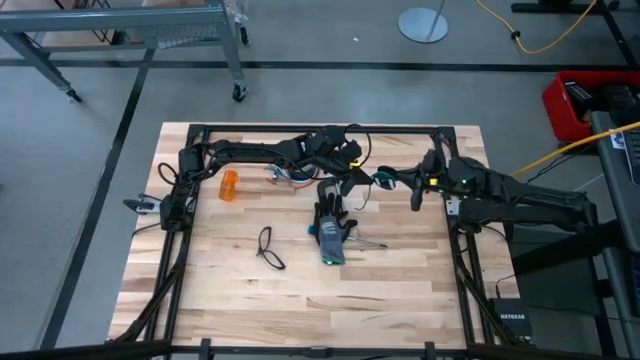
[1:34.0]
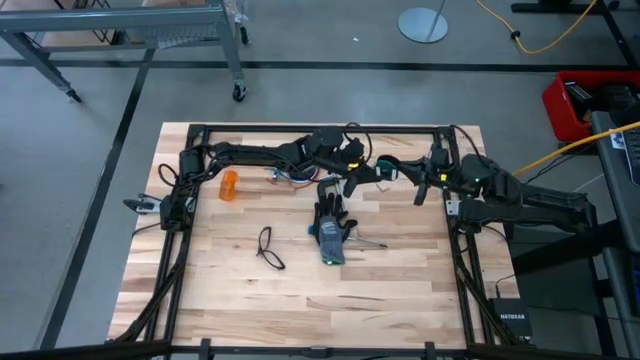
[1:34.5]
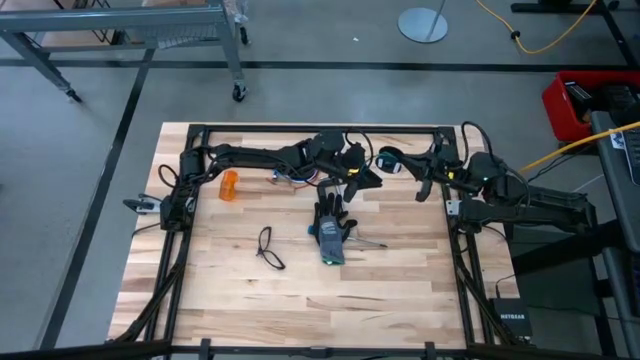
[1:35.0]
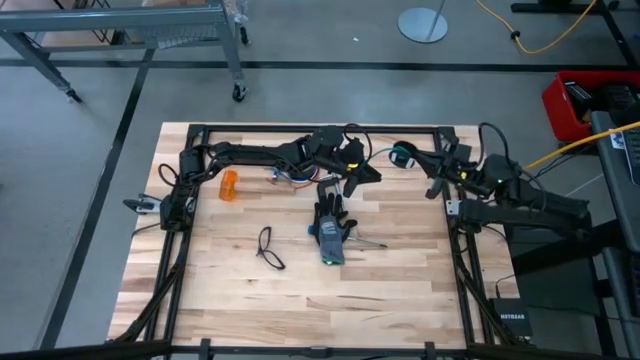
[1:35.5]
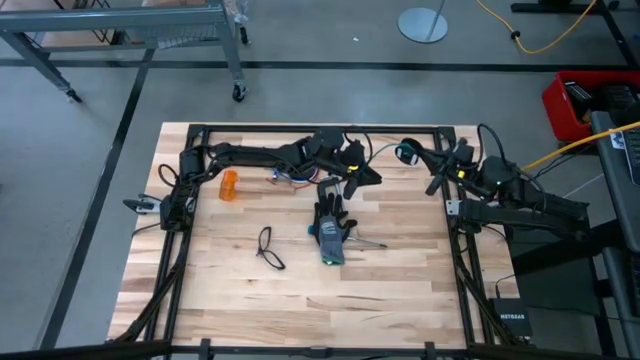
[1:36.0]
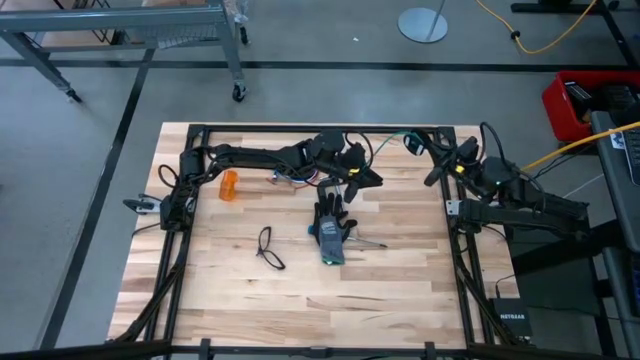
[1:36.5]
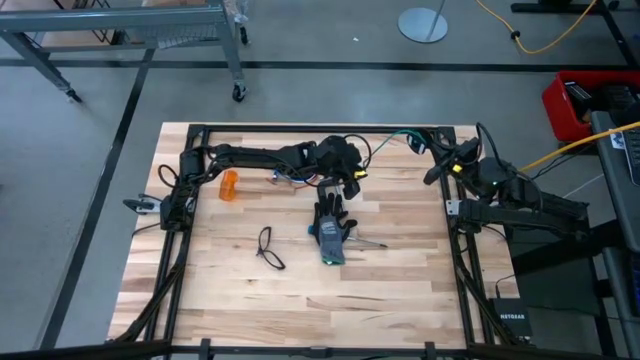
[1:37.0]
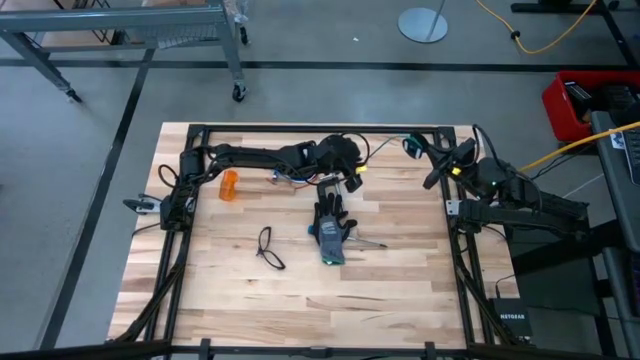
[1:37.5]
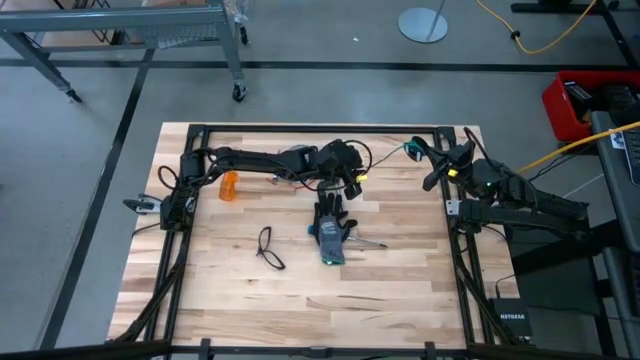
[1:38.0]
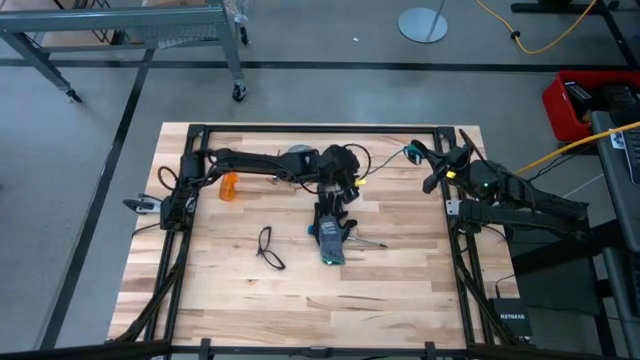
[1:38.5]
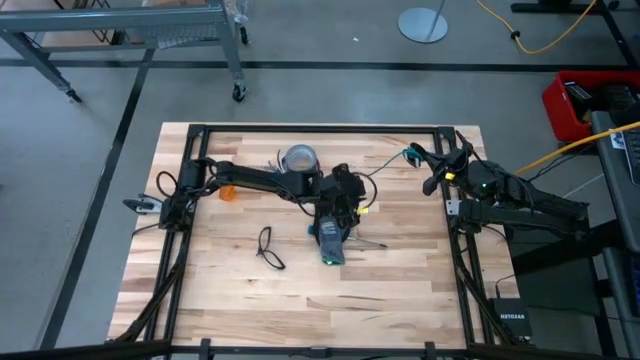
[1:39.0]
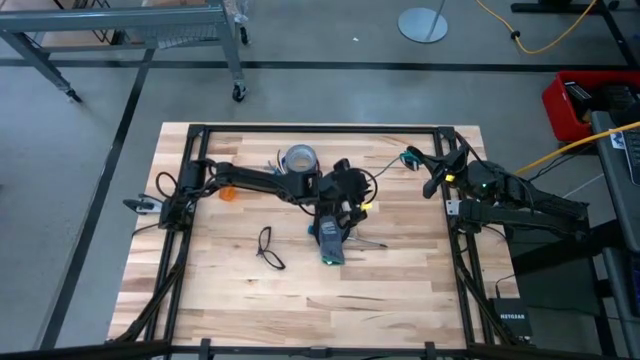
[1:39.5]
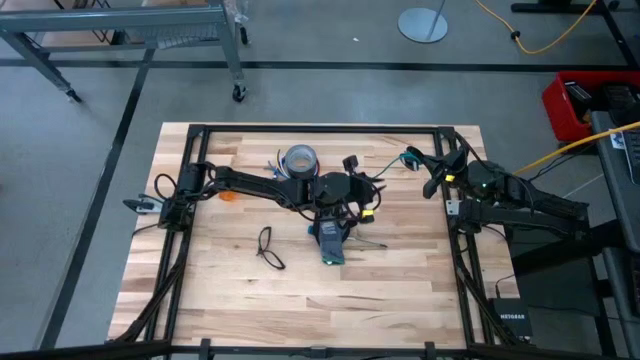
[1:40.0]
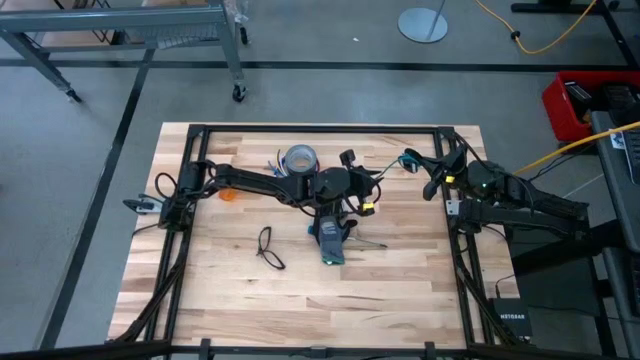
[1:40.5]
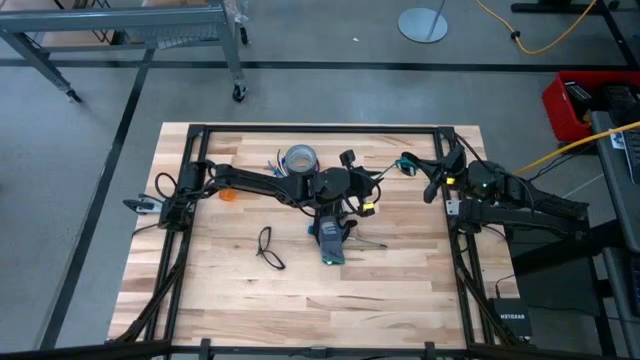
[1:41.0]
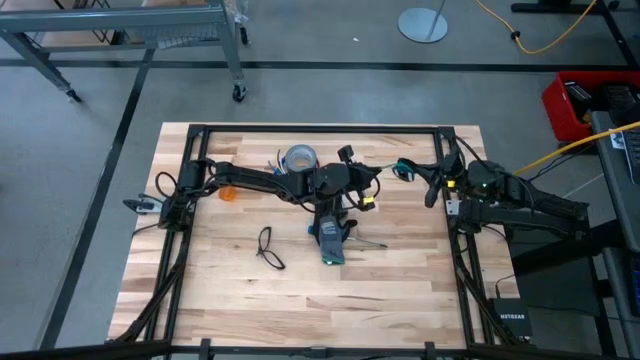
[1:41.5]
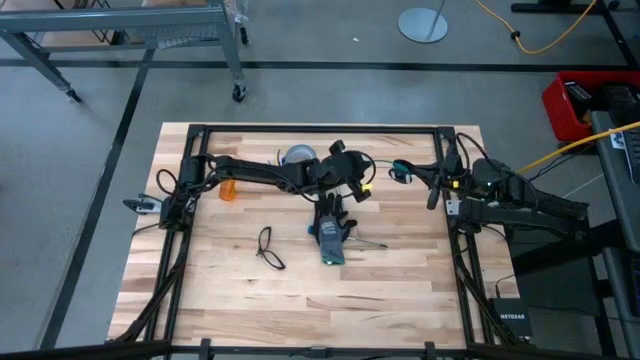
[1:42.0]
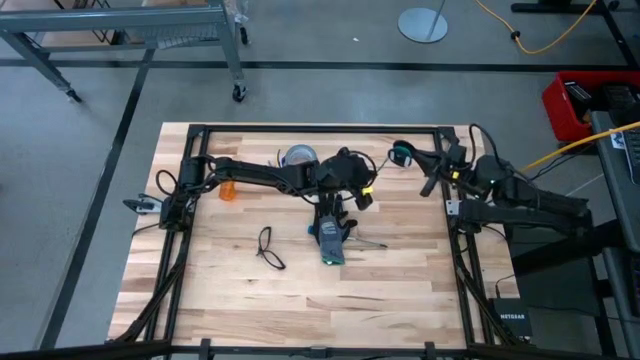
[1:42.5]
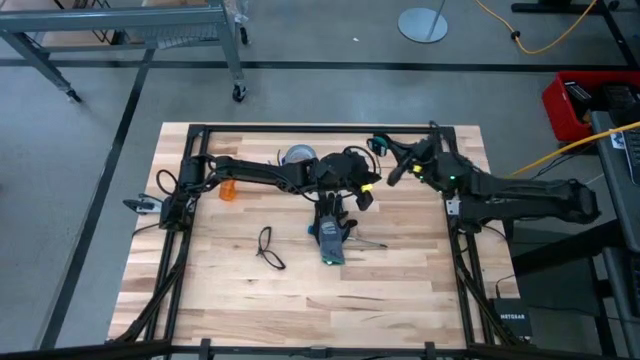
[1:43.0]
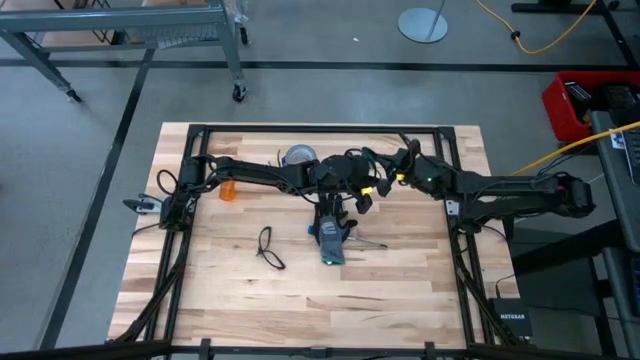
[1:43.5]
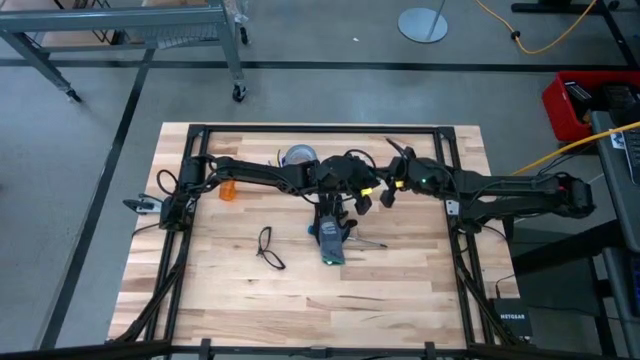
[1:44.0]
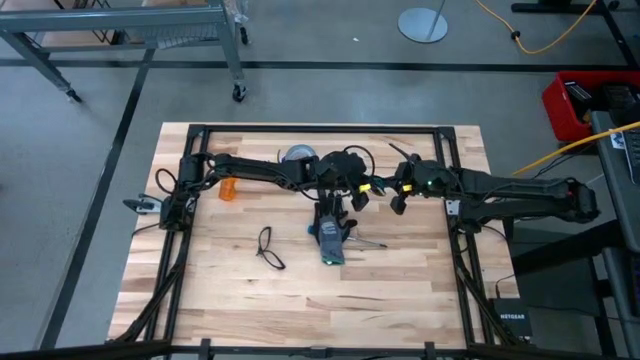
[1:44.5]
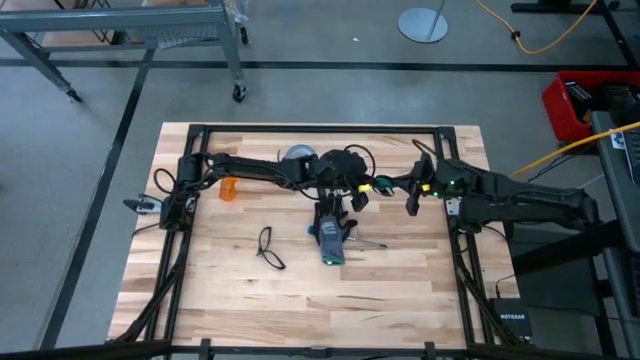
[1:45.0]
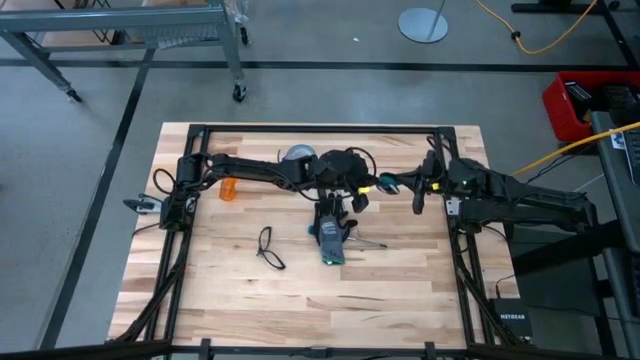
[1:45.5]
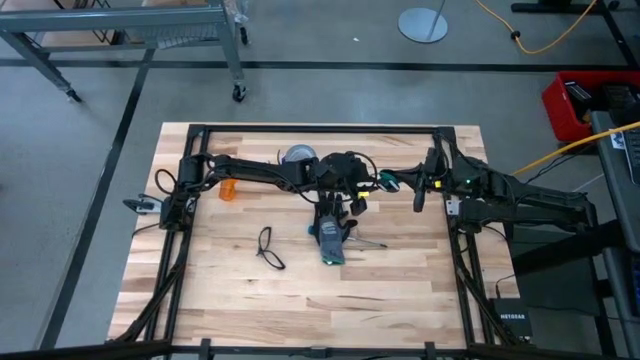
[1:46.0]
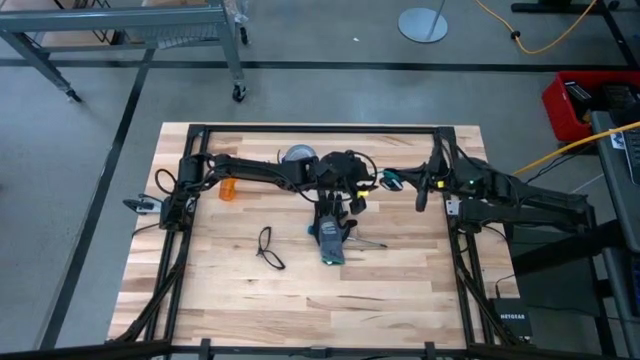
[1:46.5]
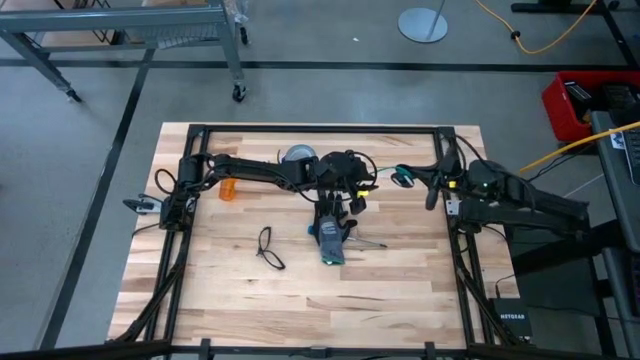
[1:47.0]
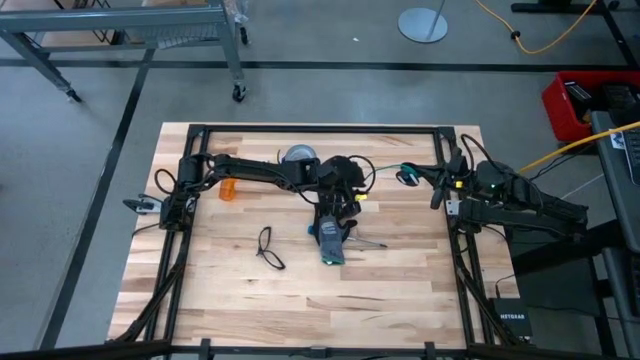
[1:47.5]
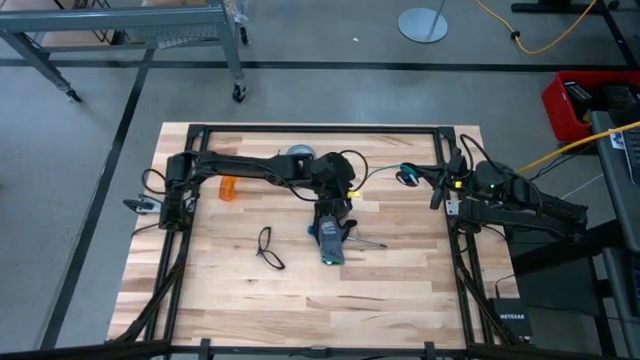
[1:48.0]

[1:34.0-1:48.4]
Task: Coil cords
Coil the green wire on the black spool

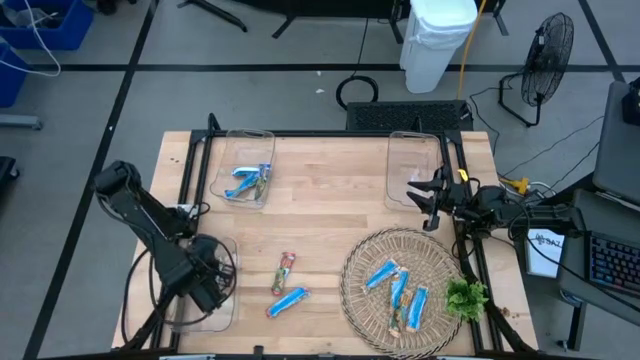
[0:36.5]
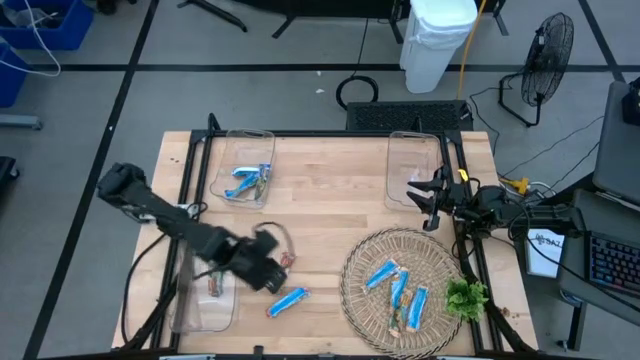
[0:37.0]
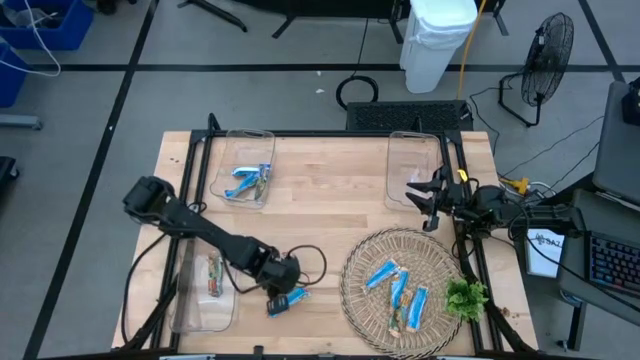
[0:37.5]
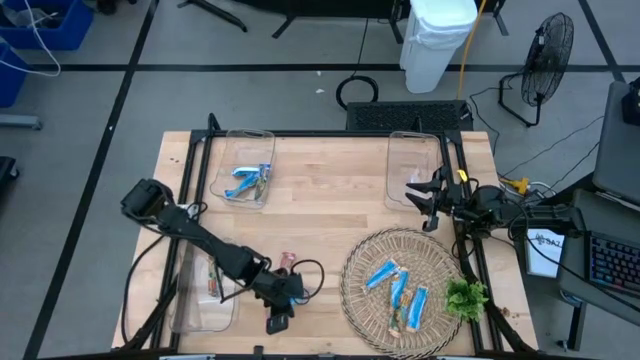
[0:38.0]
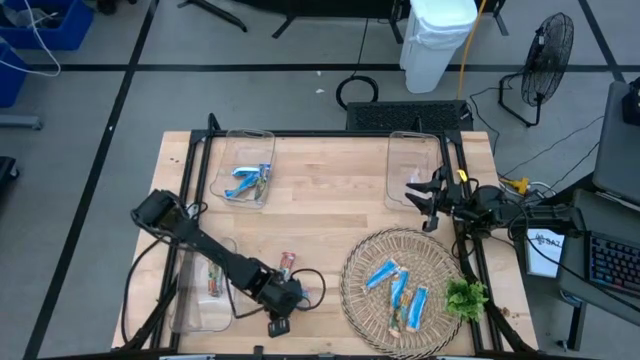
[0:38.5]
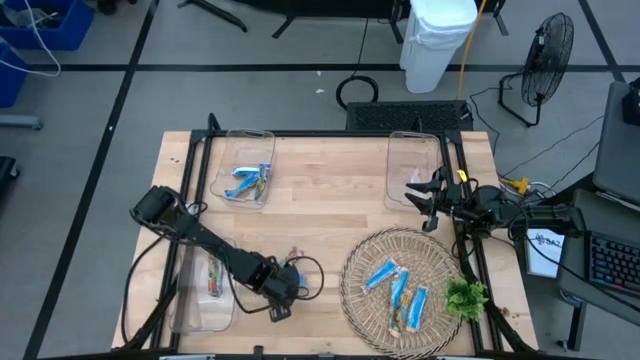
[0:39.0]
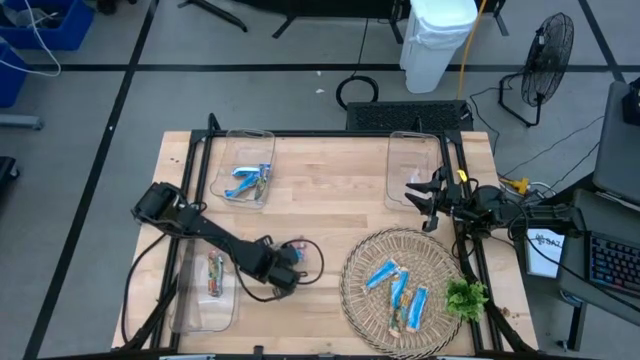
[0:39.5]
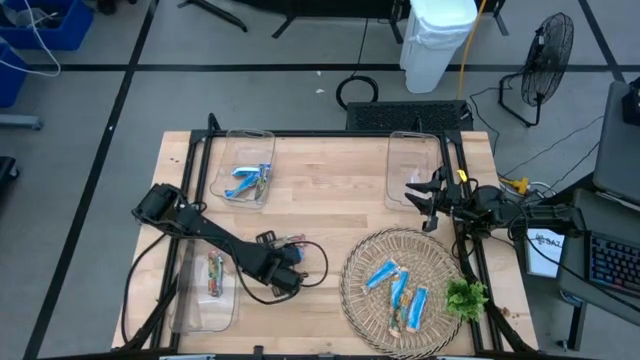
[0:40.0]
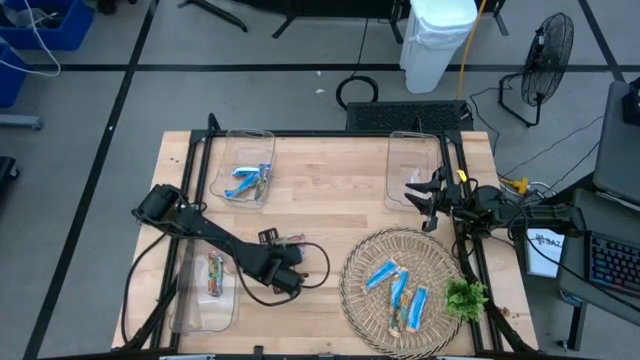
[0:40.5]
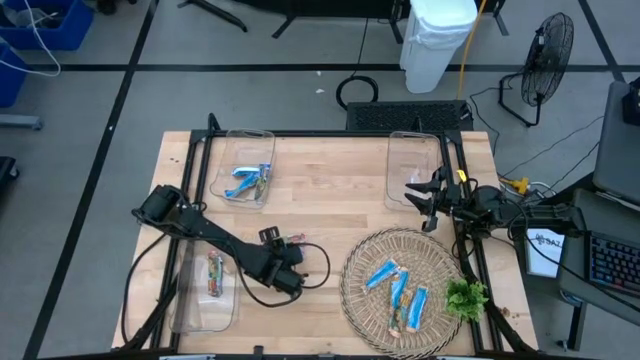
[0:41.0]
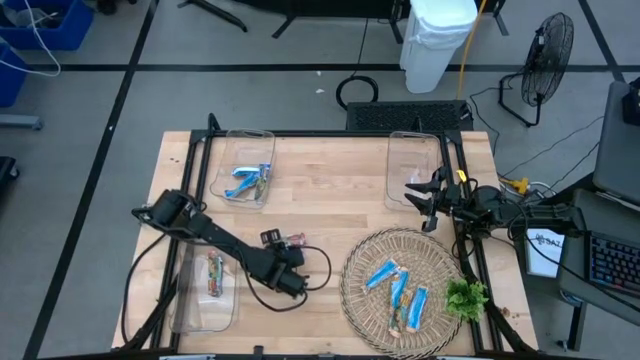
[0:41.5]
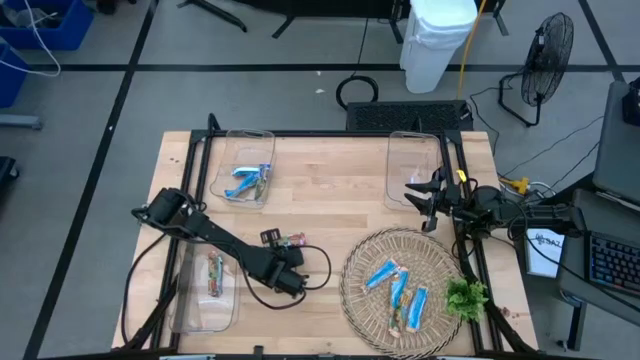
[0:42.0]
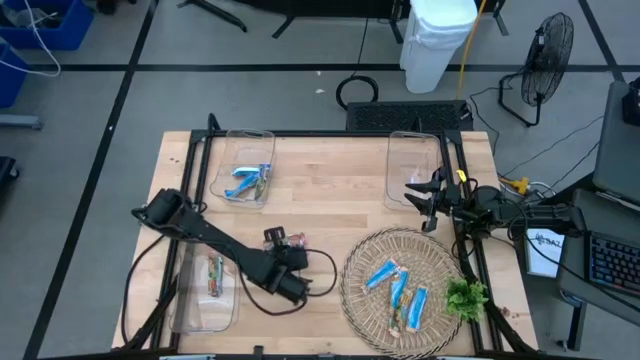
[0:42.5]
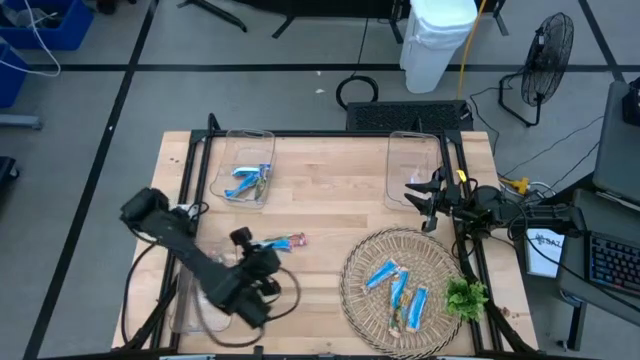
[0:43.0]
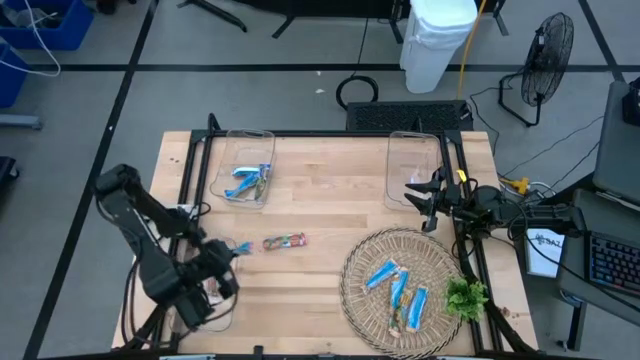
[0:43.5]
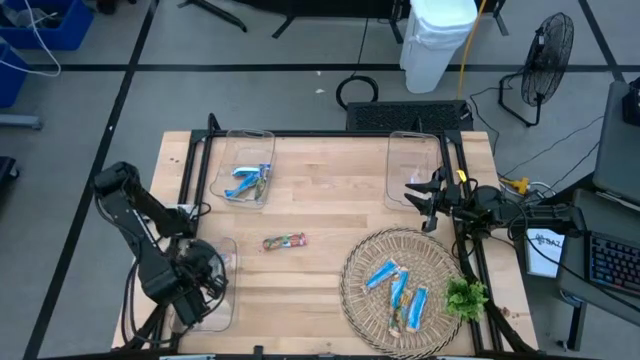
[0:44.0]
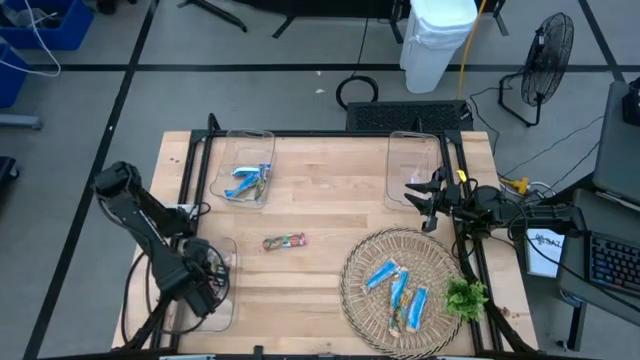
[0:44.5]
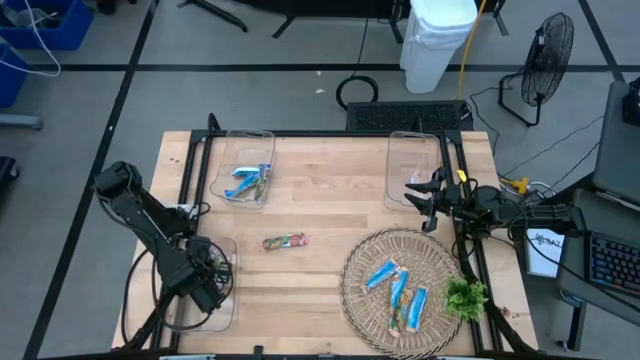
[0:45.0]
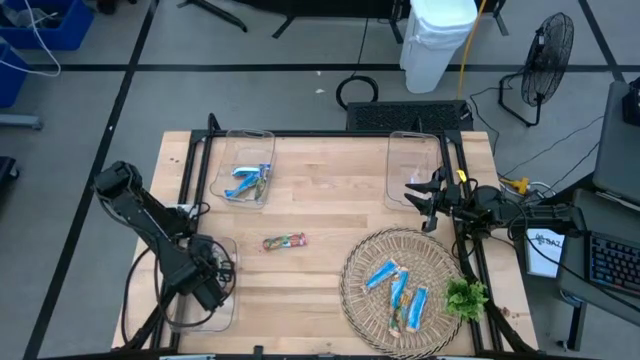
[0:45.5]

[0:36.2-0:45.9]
Task: Pick and place Granola Bars by type
Put the orange granola bar into the bottom transparent bin
